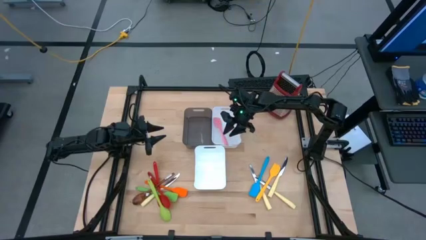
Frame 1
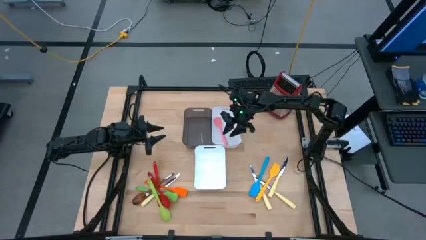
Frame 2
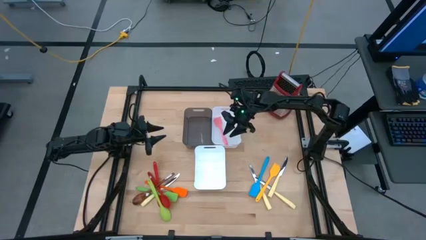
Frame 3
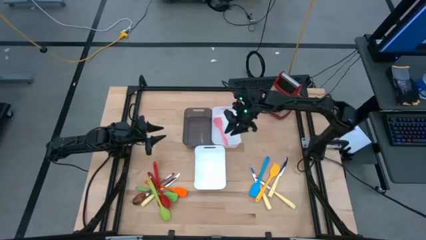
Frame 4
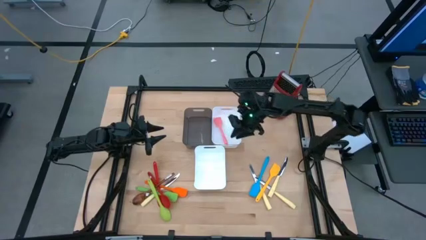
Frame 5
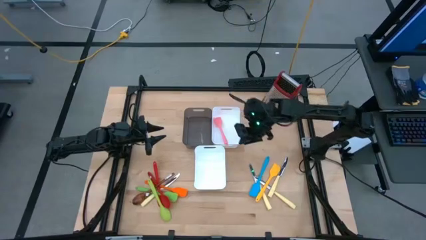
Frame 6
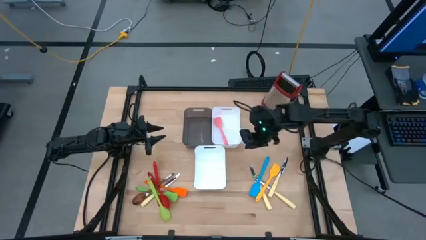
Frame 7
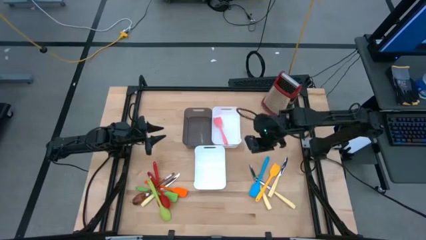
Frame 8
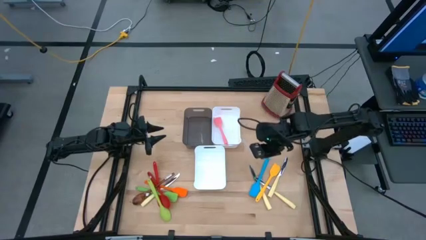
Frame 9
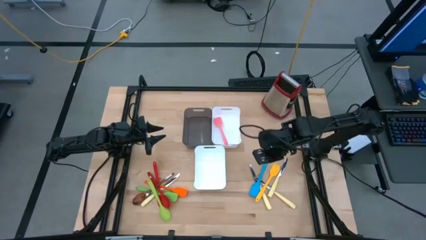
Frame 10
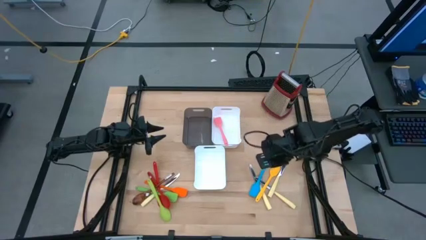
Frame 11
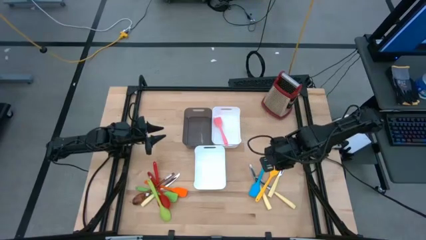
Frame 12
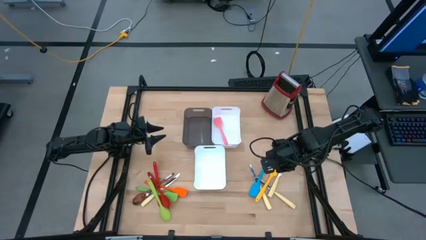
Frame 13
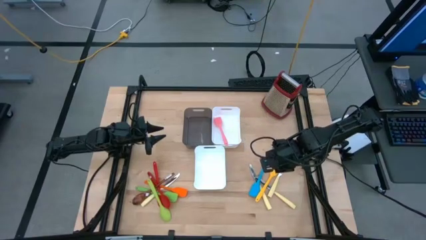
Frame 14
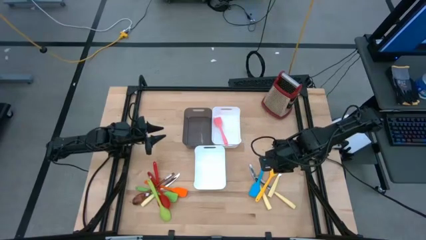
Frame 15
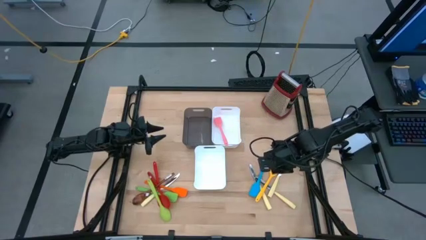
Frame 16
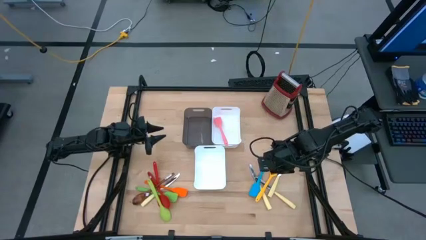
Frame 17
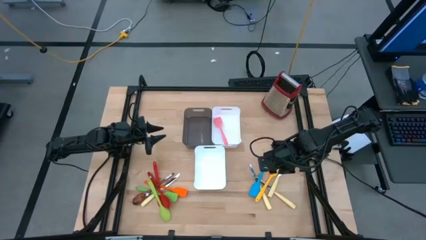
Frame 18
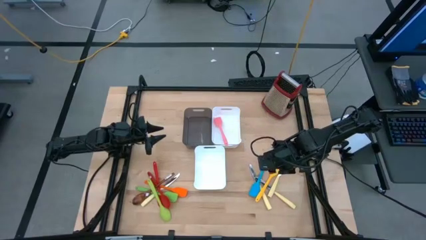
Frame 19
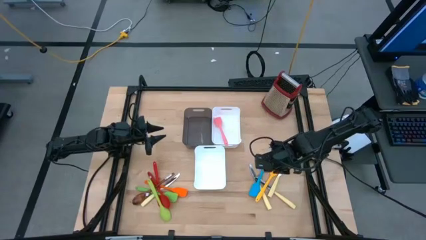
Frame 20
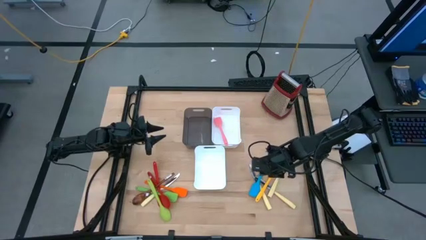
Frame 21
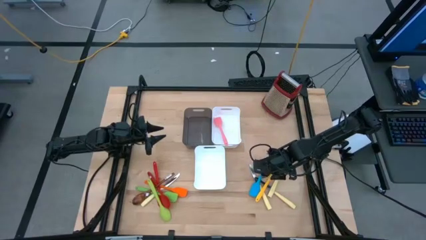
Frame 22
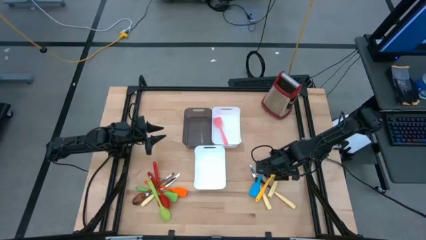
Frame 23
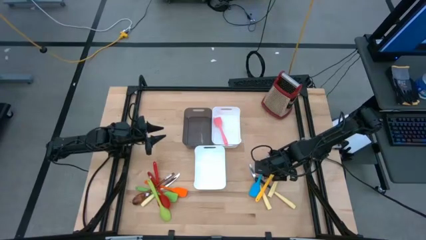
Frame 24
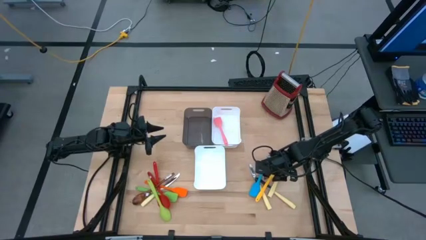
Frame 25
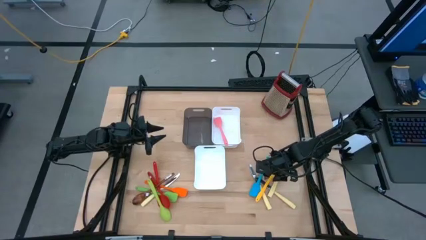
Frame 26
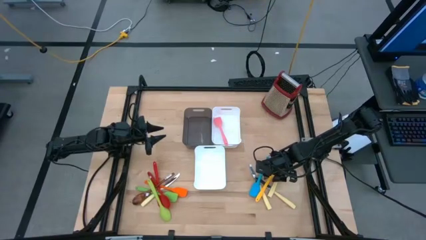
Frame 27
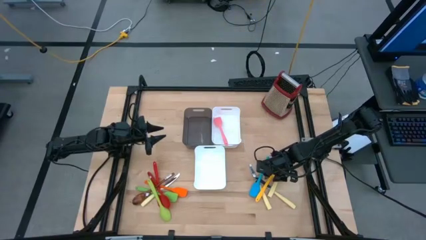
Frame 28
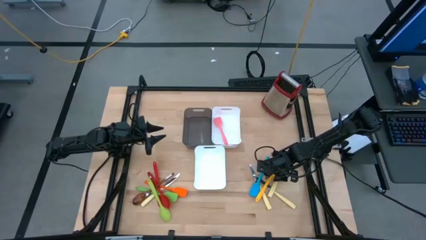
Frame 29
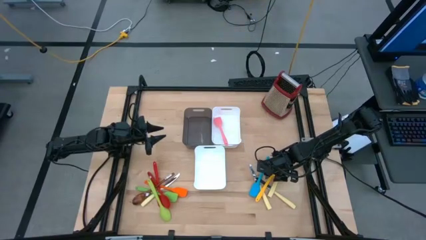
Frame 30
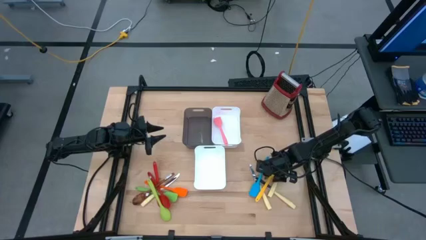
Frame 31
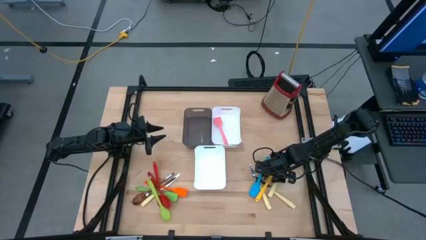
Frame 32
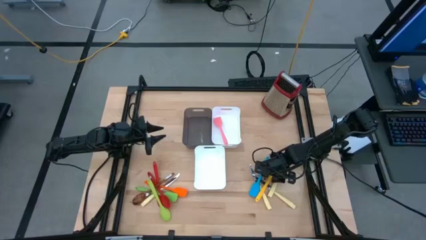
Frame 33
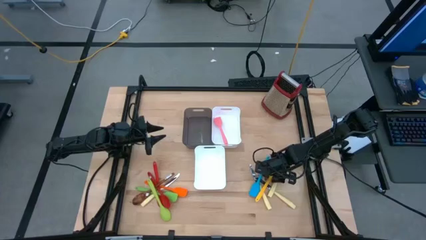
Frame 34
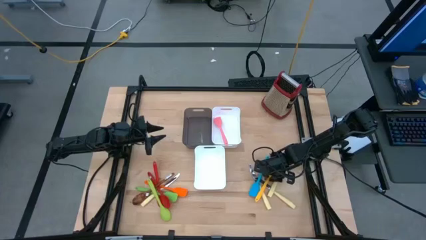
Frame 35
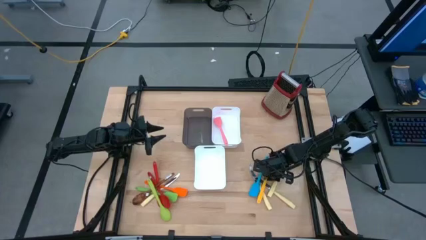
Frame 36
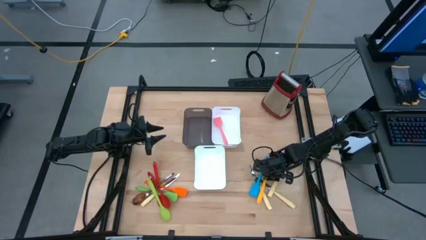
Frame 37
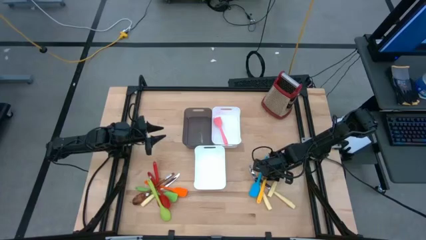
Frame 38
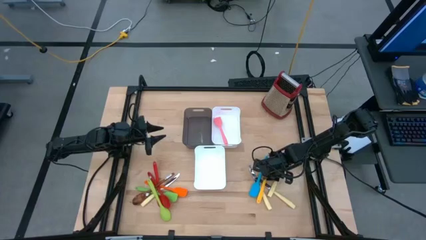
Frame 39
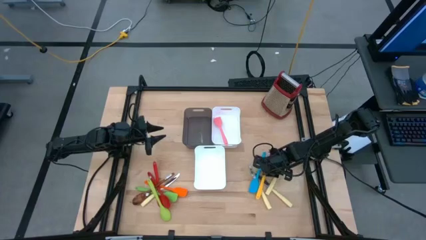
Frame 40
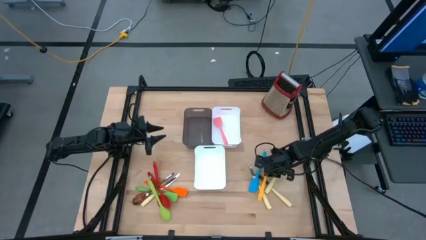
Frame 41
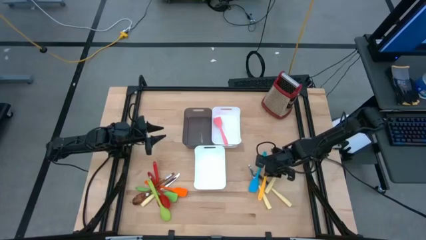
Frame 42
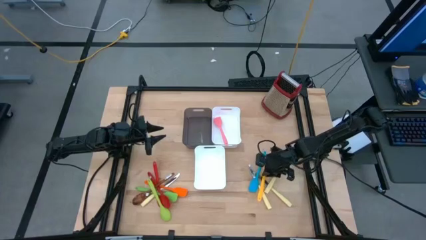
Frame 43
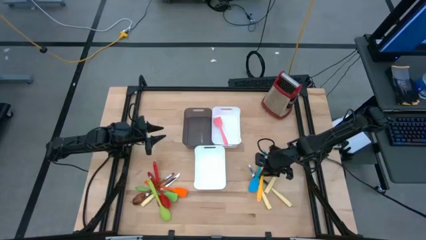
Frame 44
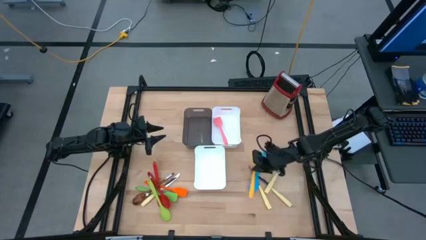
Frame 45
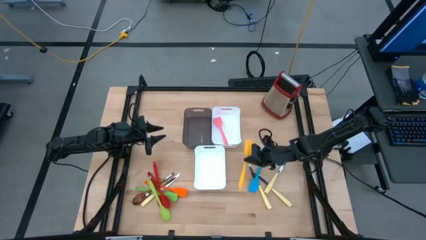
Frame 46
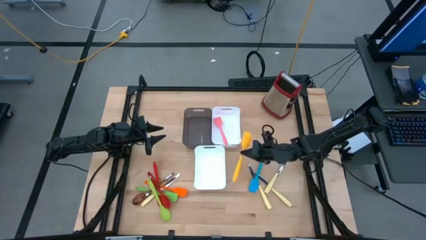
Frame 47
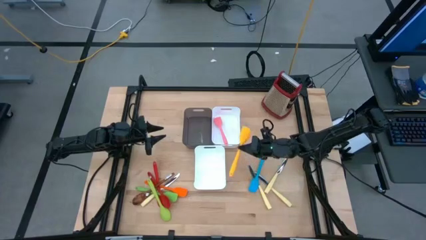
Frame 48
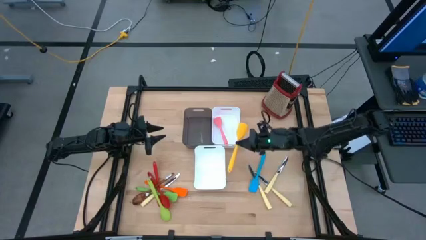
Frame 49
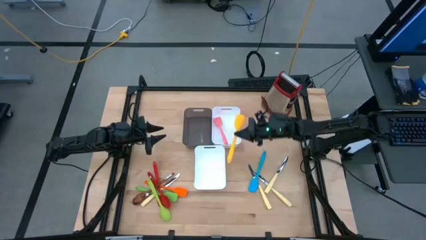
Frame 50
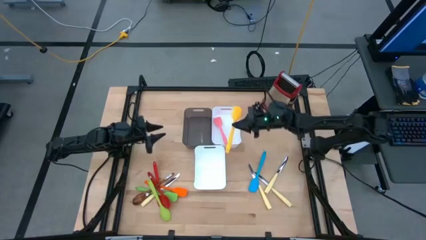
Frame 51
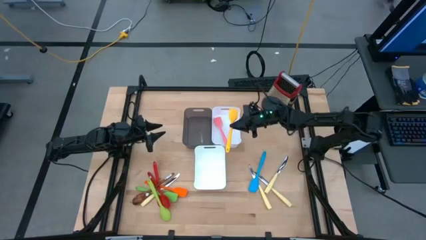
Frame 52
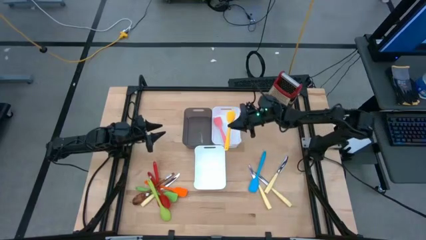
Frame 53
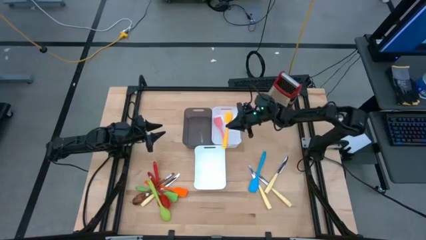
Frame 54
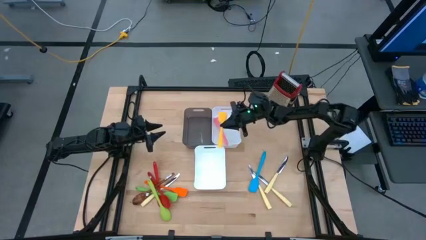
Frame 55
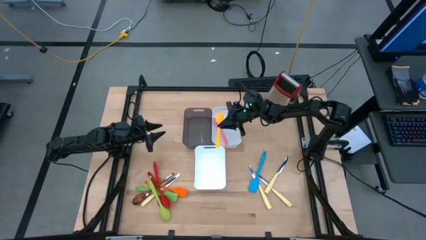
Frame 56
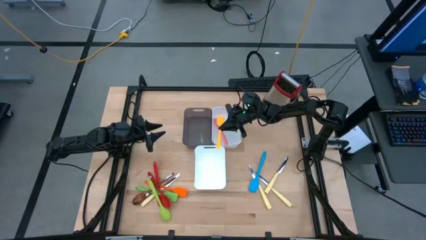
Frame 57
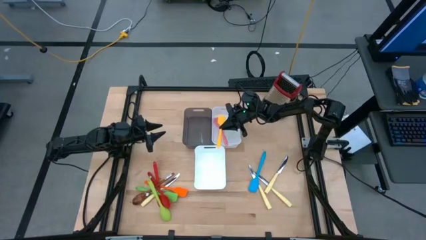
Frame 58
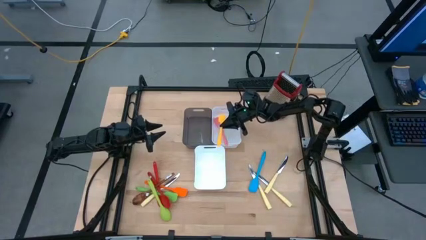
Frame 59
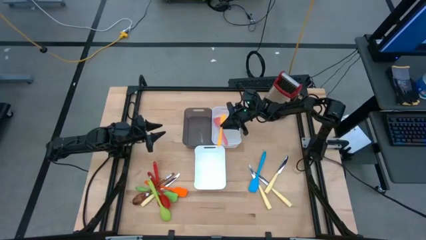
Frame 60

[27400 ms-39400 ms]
Task: Pick & Place Kitchen Items
Put the yellow spatula into the top white bin
